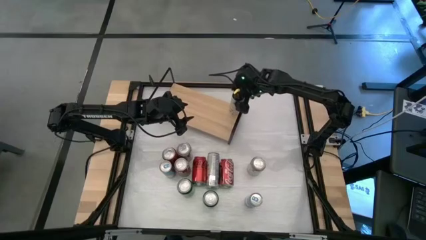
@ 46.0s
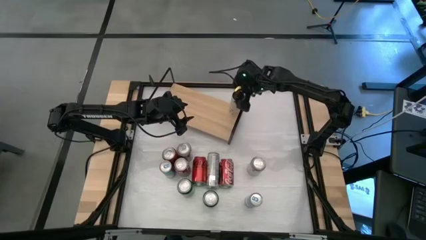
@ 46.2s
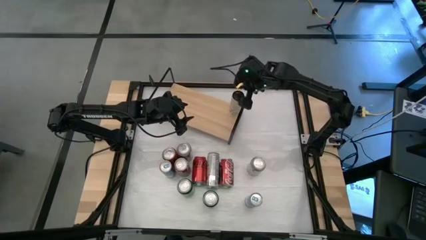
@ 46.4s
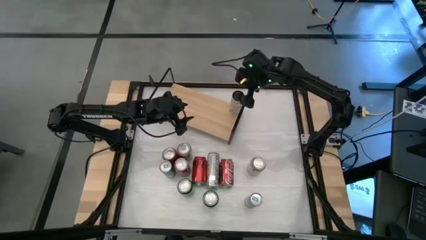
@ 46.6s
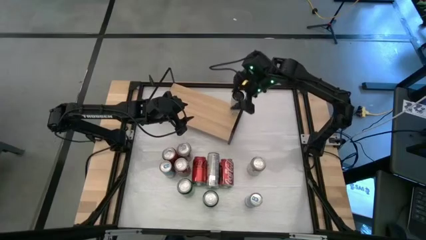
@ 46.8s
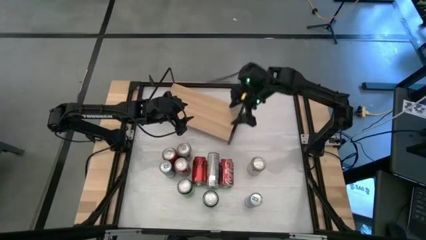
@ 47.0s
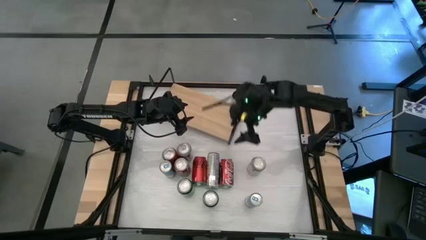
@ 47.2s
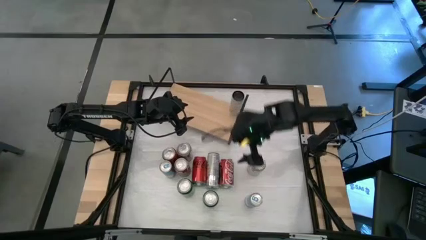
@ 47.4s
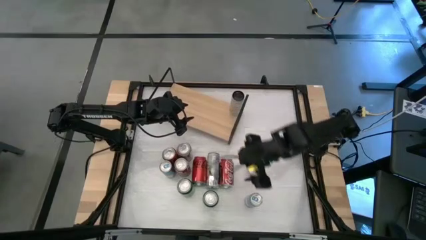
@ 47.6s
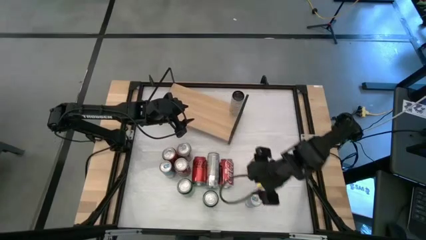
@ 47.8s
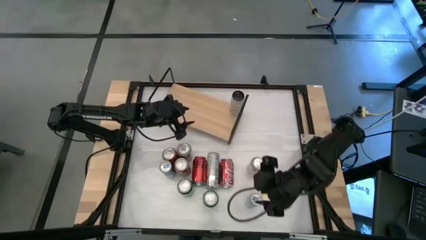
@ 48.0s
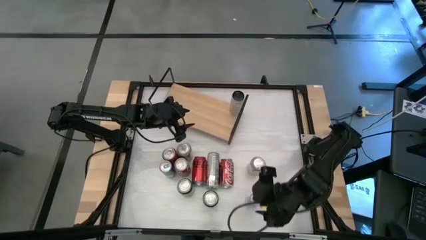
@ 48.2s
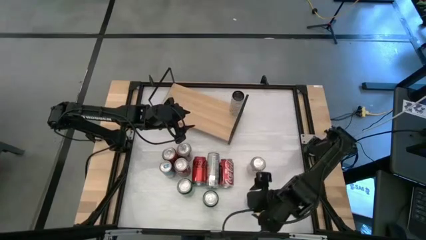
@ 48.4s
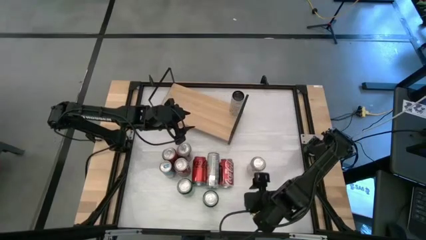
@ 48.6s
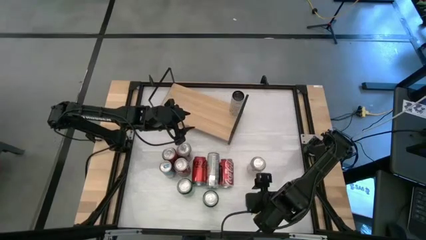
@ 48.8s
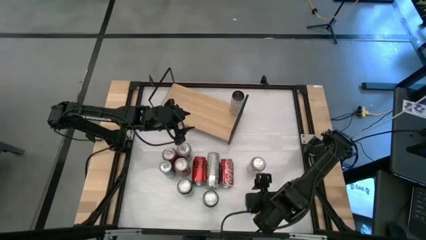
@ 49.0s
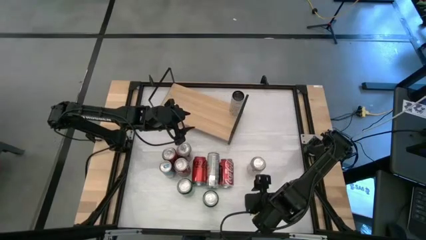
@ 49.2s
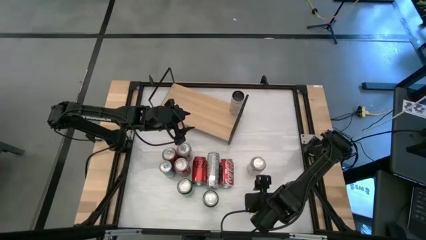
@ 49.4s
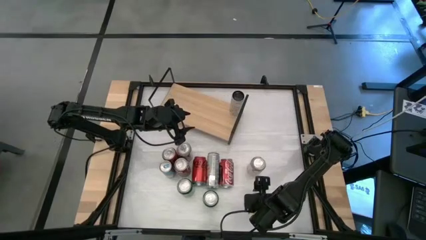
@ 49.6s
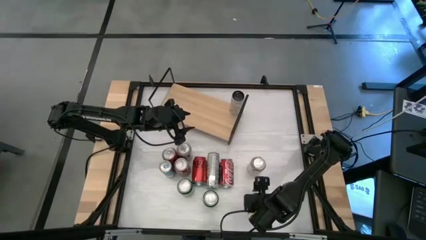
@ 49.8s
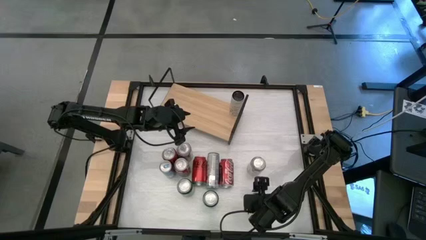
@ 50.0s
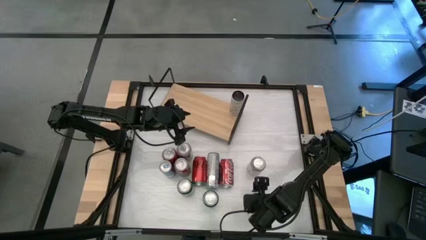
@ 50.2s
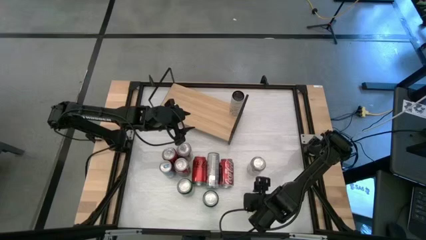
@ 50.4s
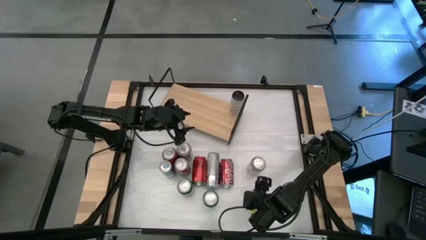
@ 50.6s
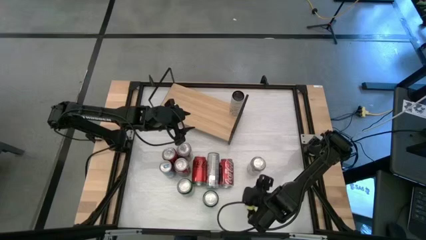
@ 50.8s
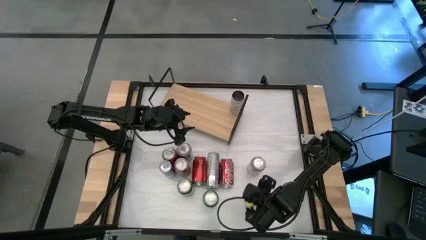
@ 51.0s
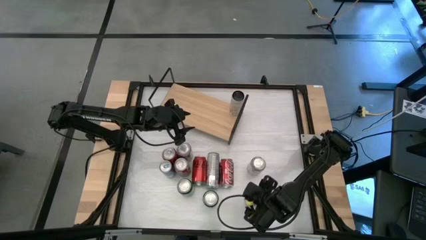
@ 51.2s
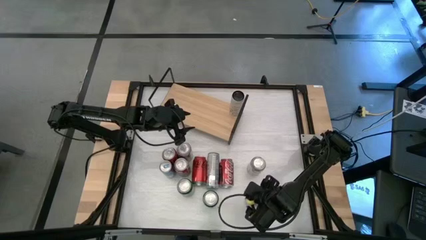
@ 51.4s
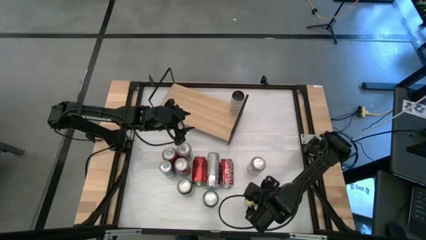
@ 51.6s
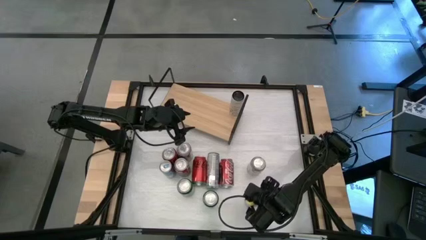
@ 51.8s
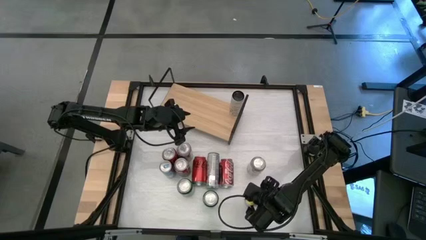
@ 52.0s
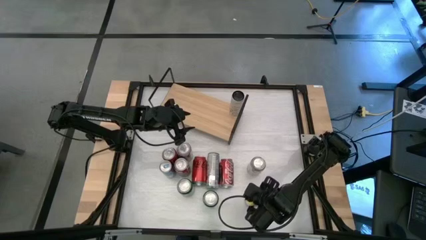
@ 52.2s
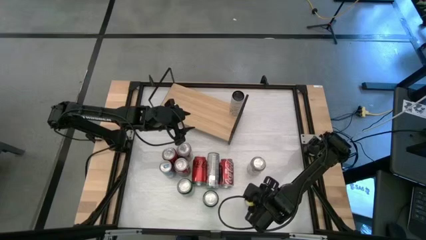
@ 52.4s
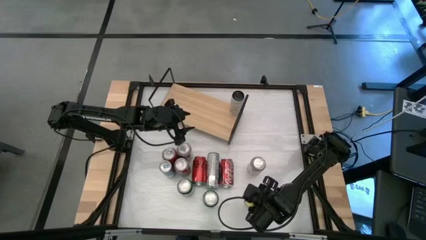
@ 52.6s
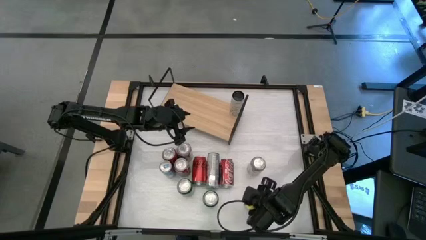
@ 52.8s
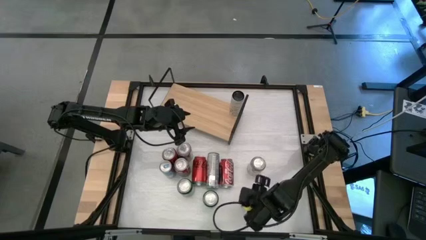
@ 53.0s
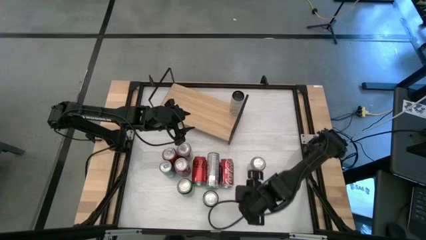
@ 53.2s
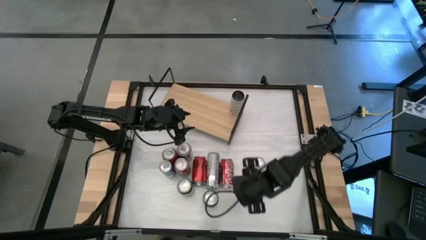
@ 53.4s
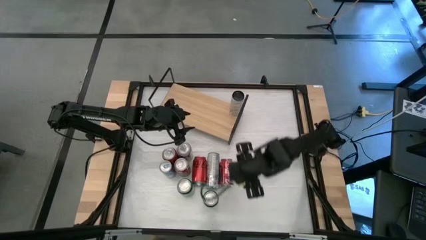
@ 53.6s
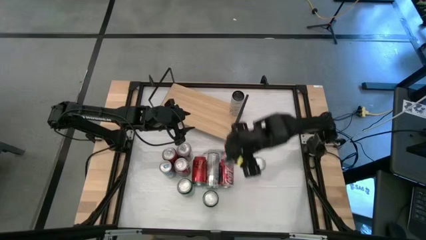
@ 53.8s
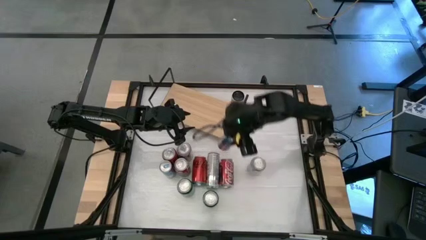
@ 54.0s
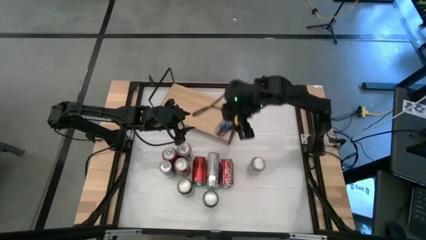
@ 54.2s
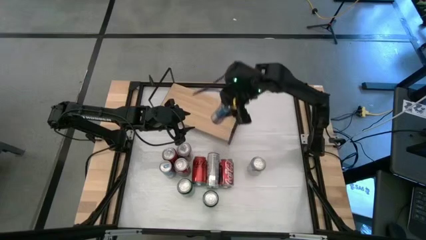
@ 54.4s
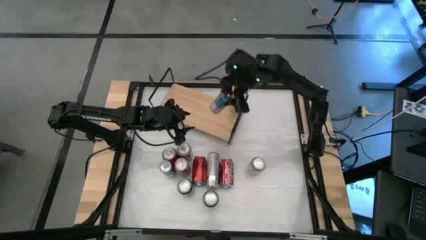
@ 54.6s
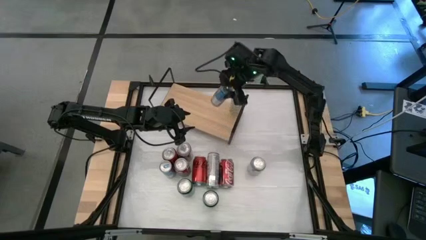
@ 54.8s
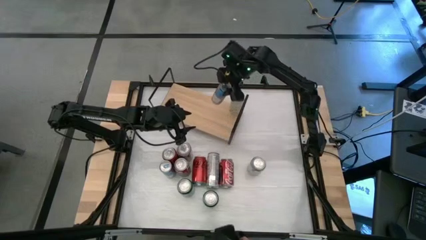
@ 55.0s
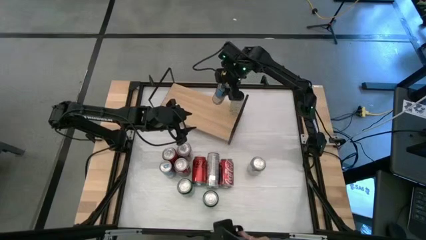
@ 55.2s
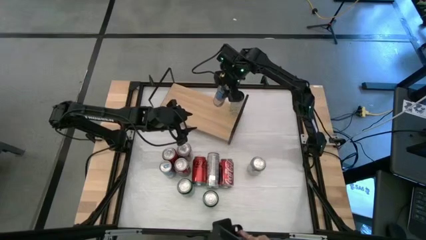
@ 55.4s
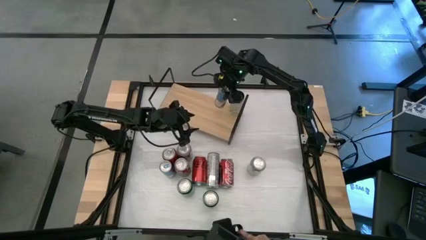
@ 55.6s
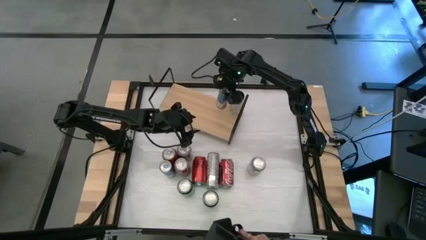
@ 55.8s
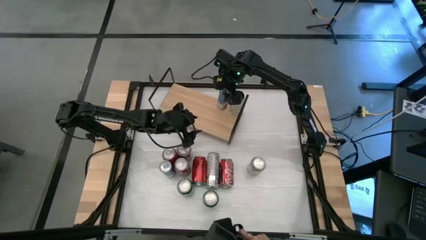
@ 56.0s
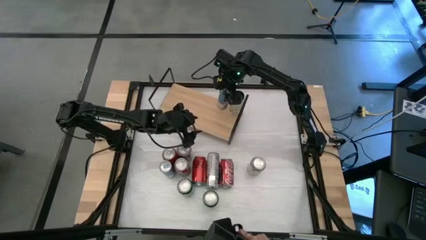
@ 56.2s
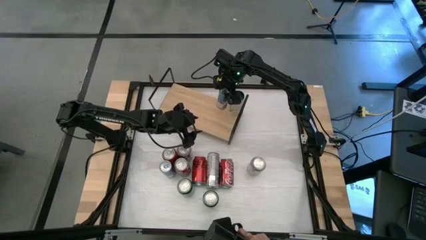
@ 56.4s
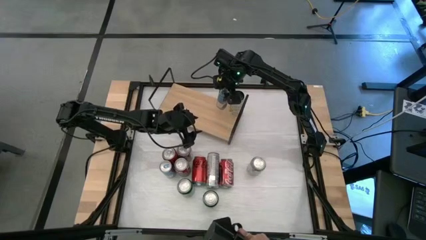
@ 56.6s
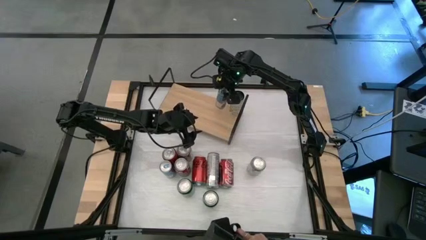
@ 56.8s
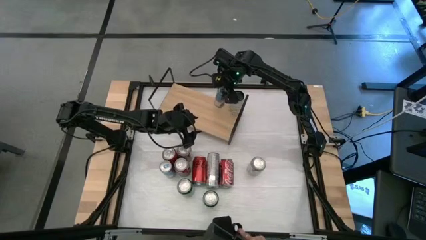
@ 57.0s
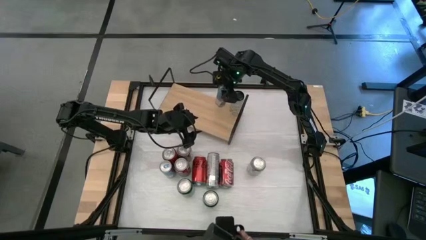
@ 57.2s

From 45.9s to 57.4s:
Task: Place canned beverage on shelf
Put the right blue soda can on the shelf

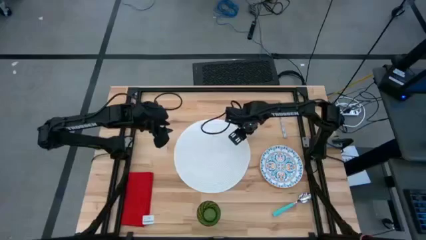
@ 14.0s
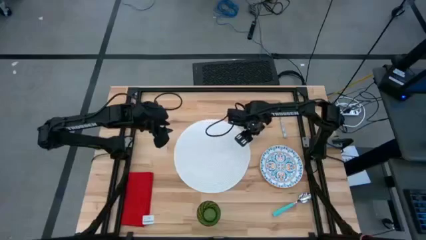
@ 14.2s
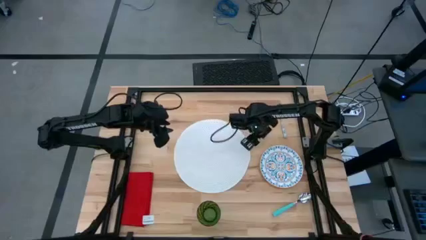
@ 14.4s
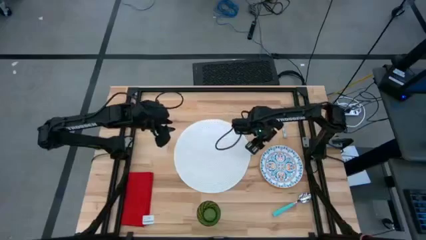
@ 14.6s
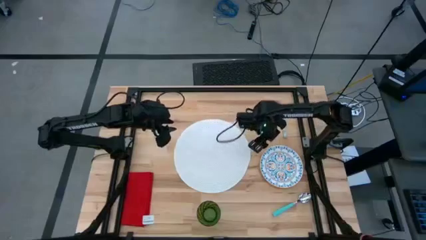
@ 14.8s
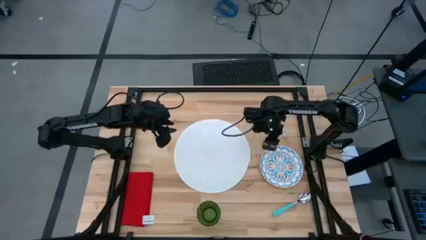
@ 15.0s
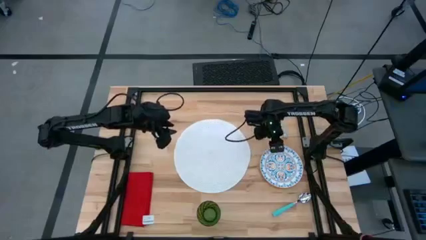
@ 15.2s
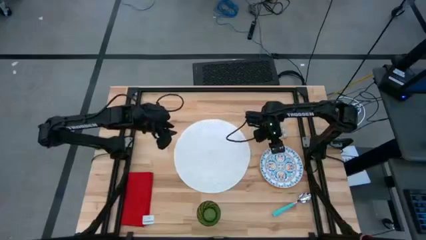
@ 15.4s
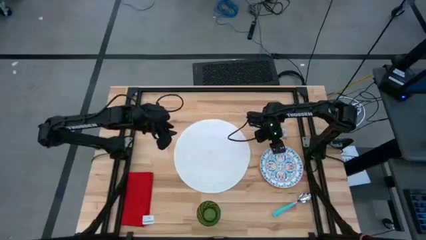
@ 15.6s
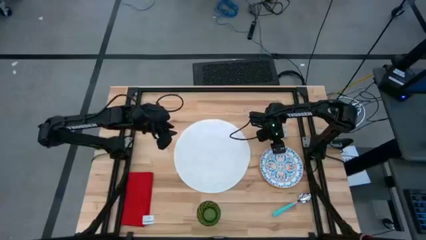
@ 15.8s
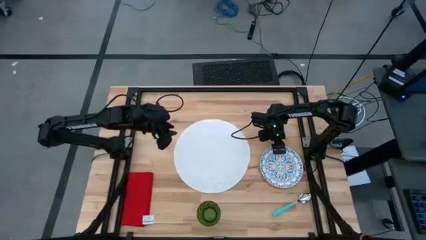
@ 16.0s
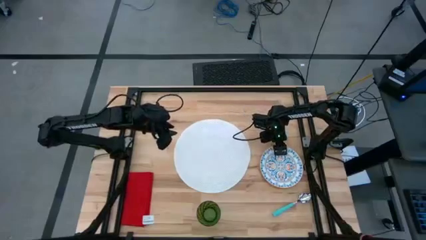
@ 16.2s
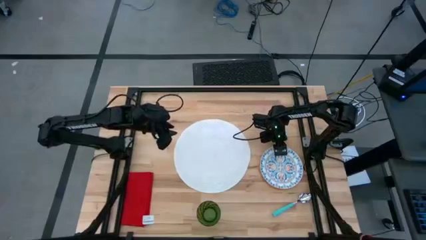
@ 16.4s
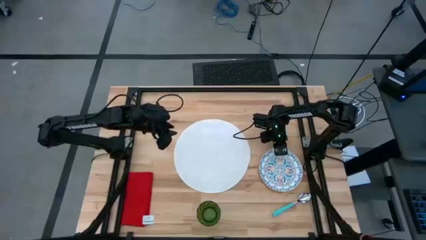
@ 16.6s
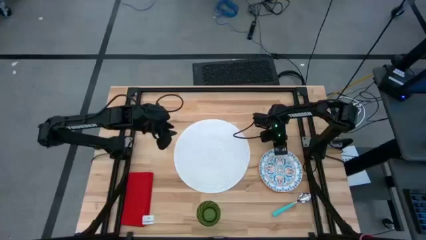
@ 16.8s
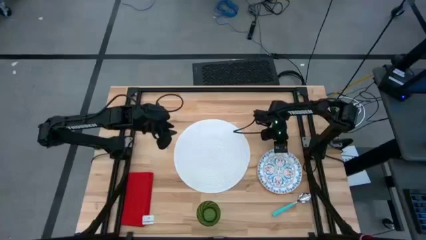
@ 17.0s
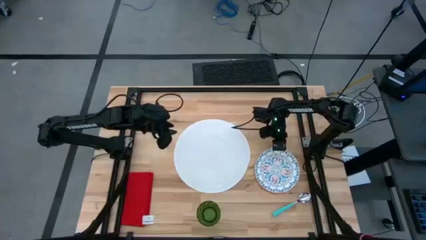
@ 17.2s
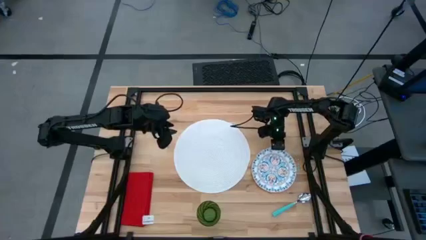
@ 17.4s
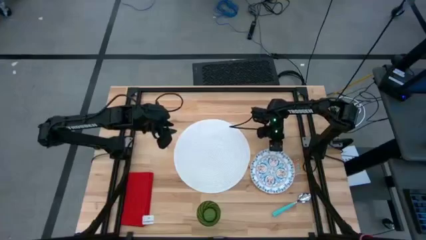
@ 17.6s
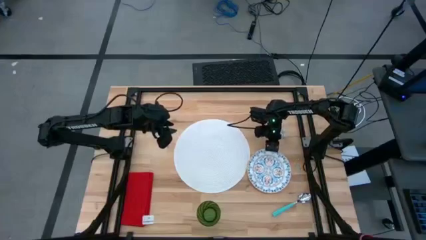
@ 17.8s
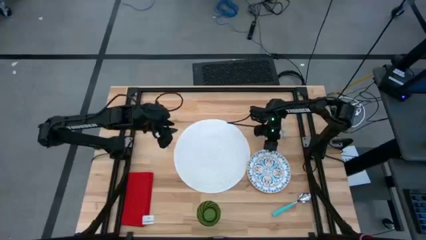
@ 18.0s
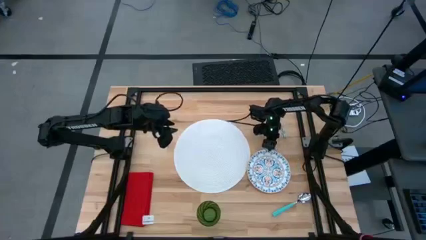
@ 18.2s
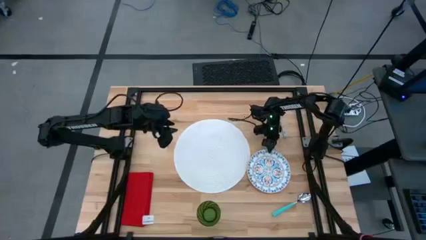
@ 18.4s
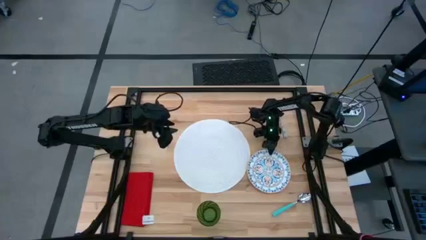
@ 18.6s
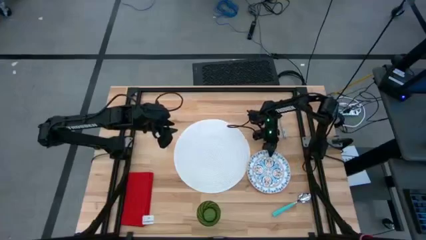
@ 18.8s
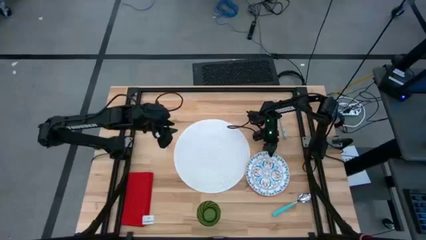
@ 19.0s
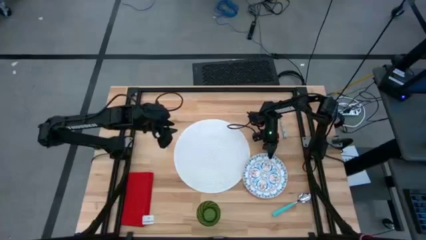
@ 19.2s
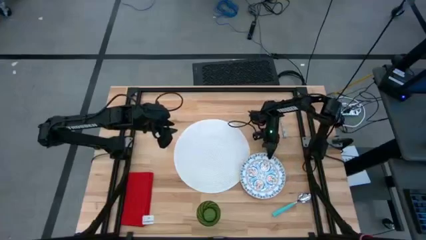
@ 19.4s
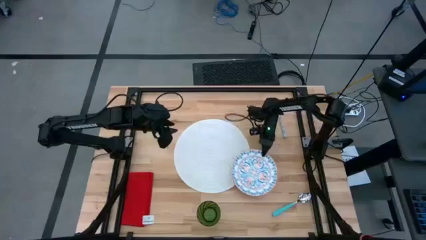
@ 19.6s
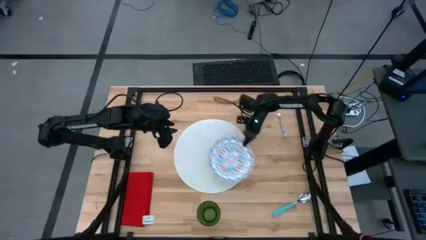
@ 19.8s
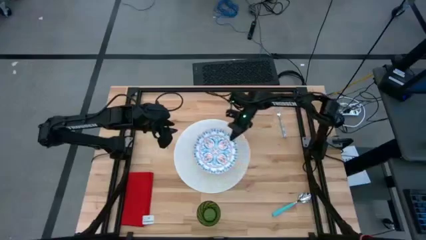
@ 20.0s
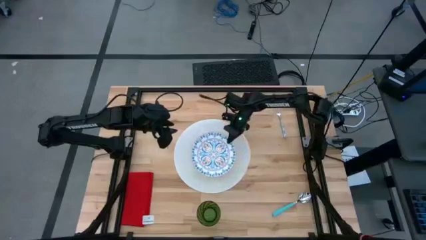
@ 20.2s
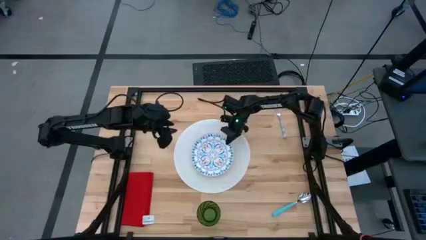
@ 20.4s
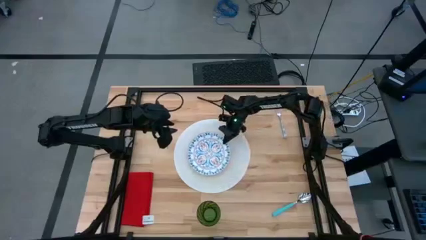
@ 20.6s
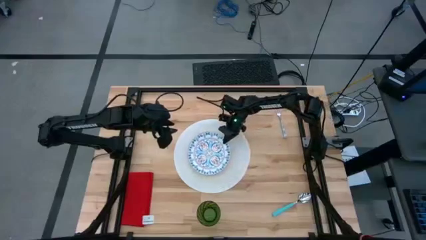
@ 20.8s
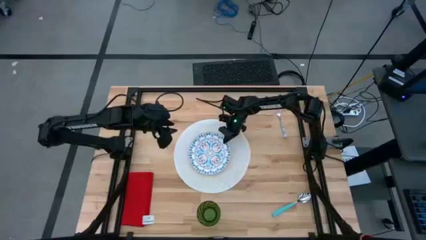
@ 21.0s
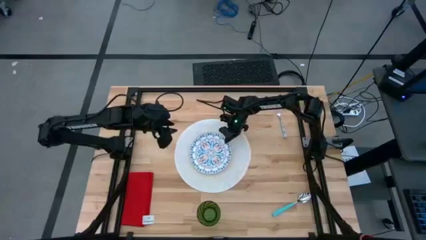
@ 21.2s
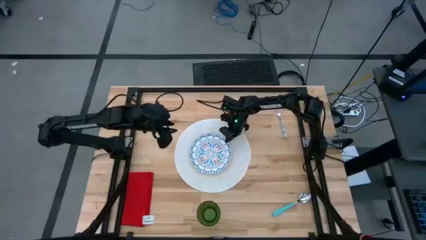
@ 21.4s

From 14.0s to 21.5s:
Task: Set table place
Put the blue patterned plate on the white tablemat
